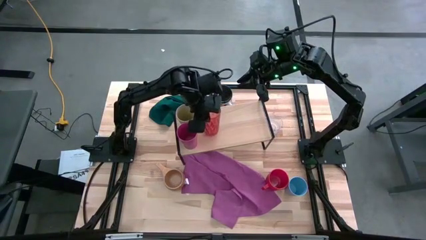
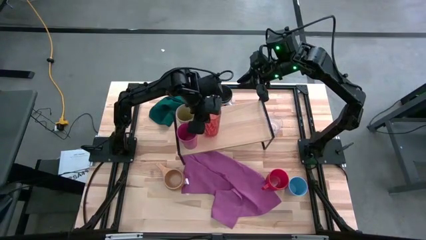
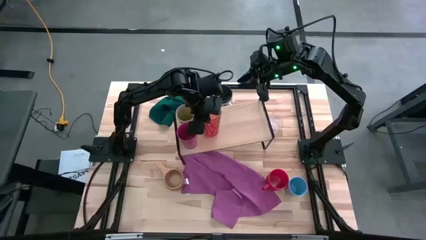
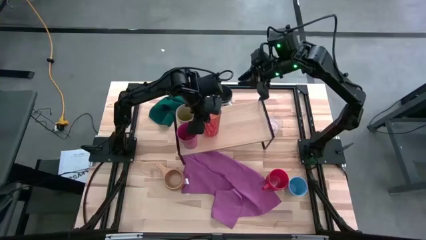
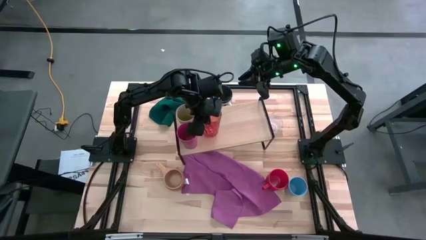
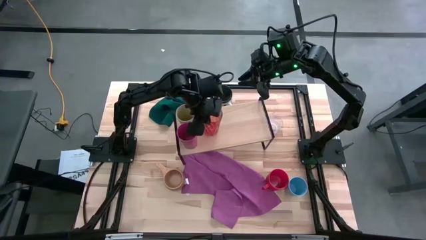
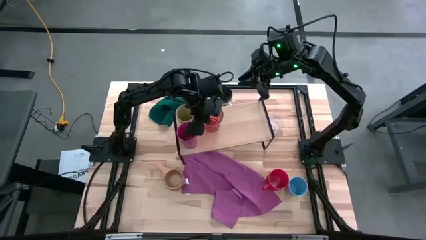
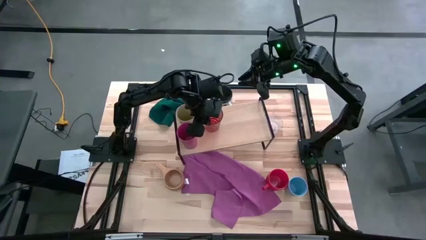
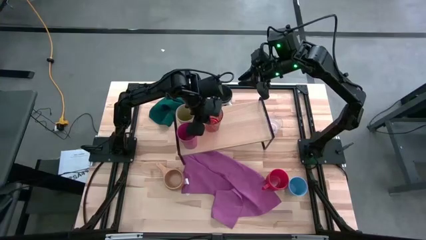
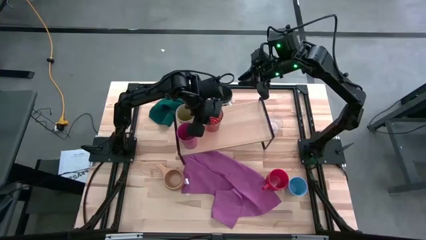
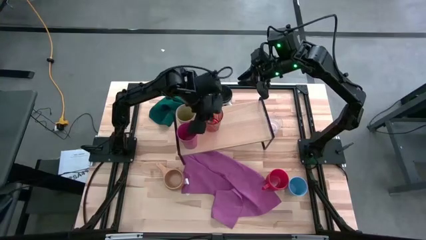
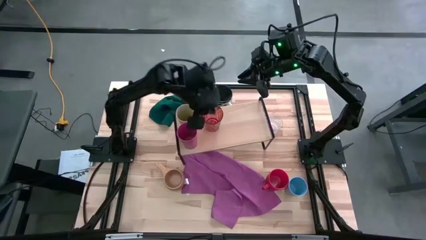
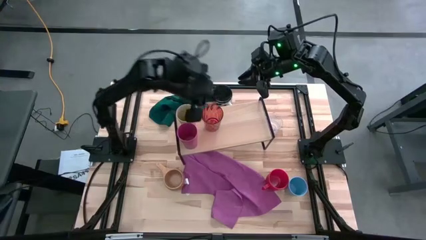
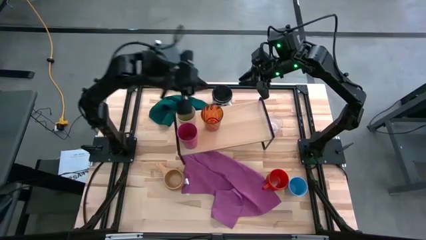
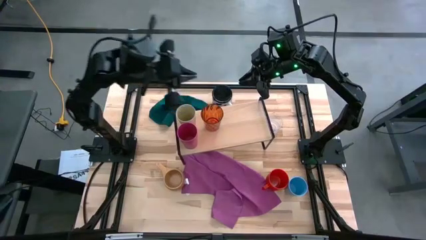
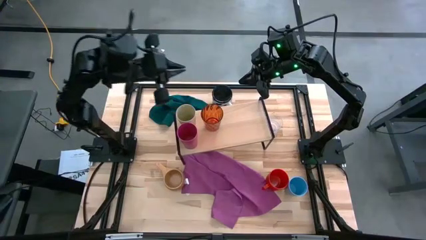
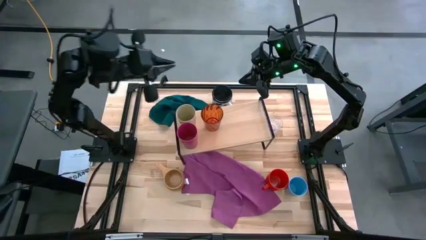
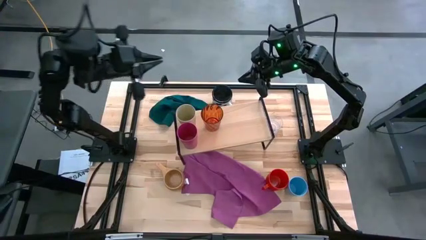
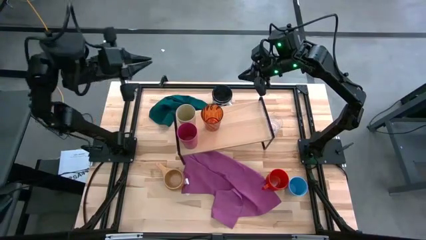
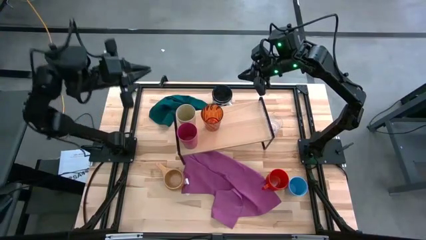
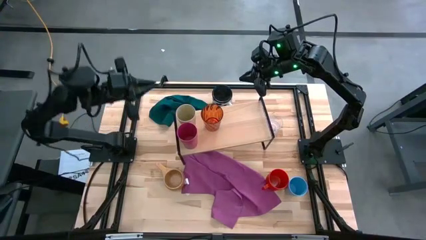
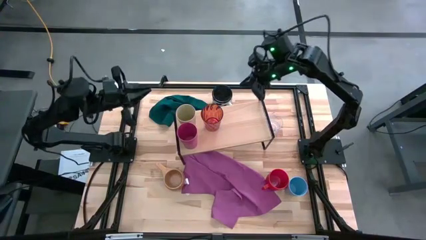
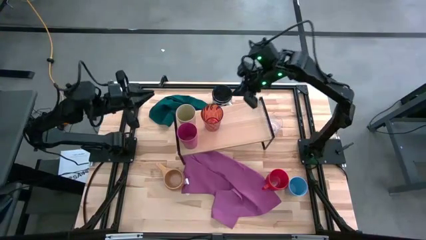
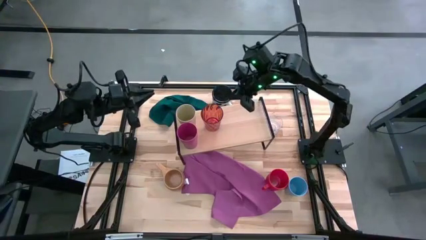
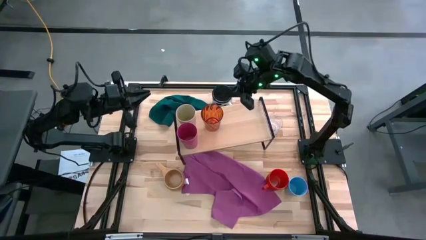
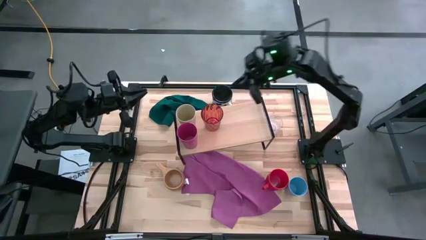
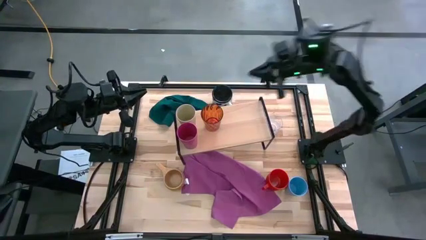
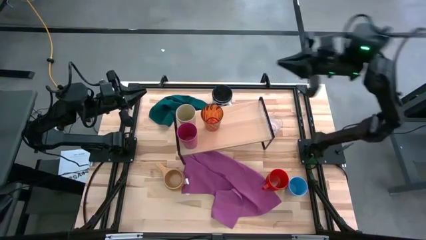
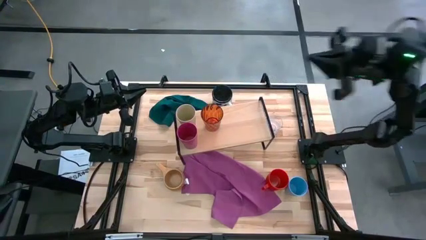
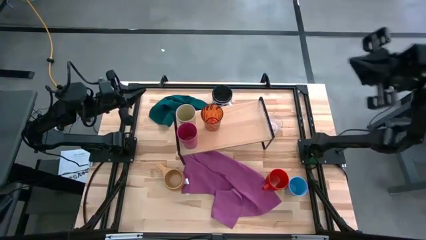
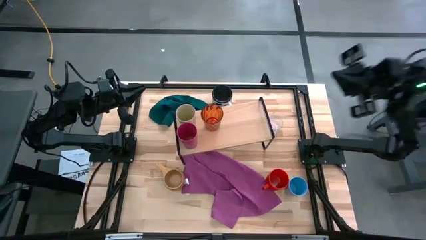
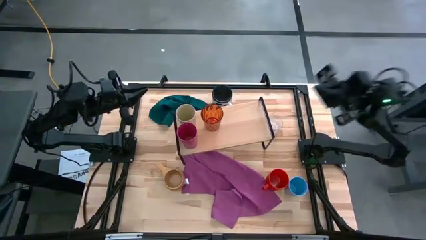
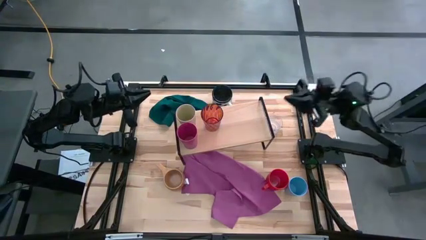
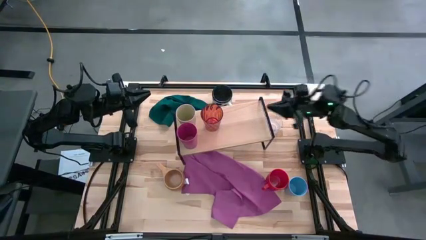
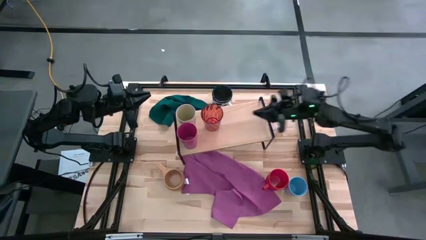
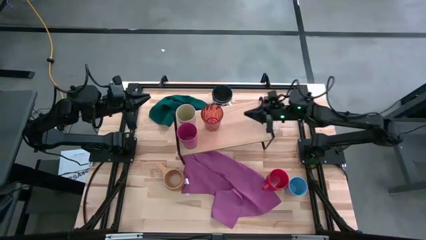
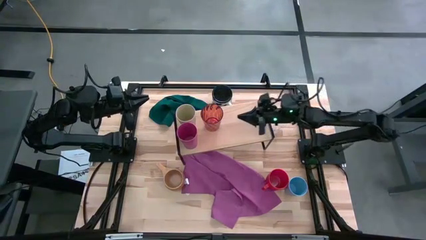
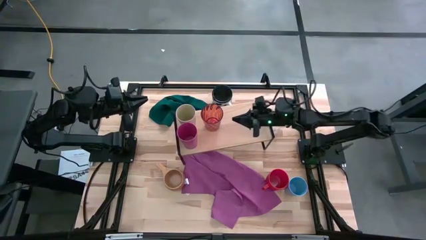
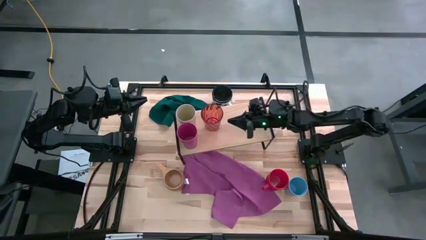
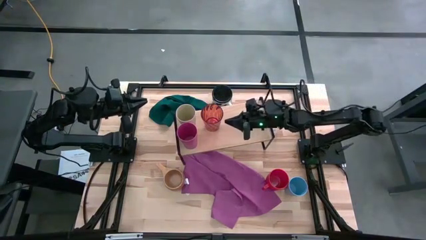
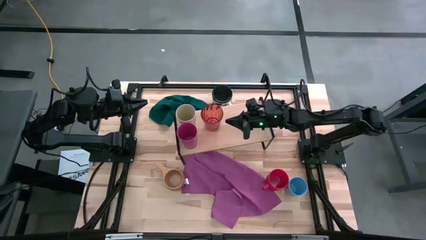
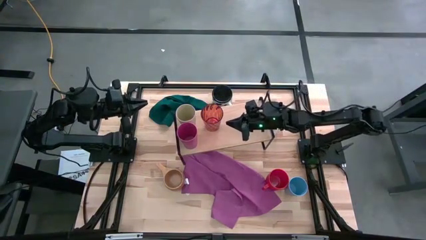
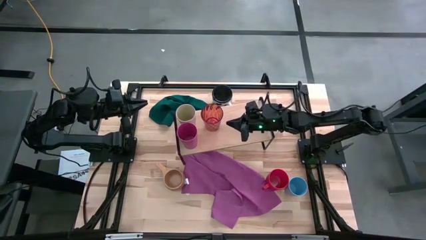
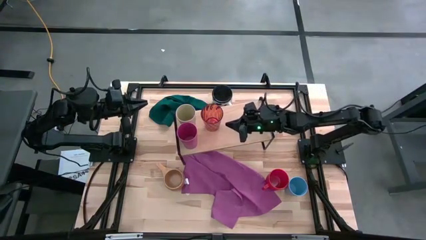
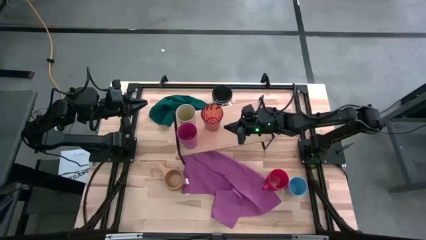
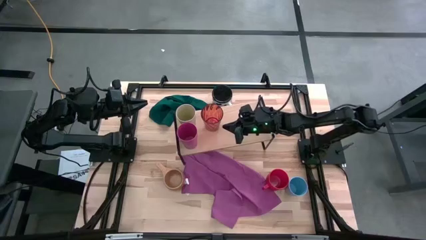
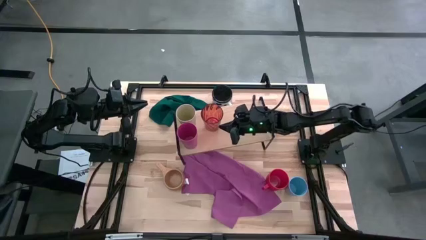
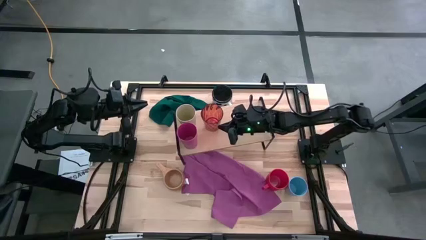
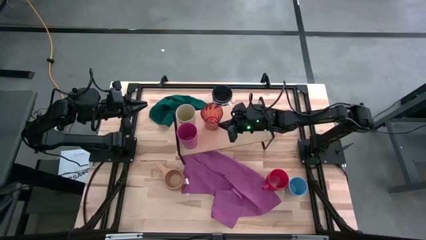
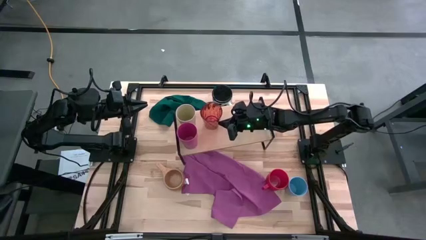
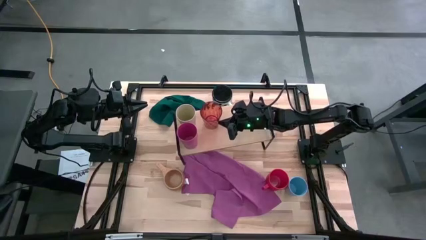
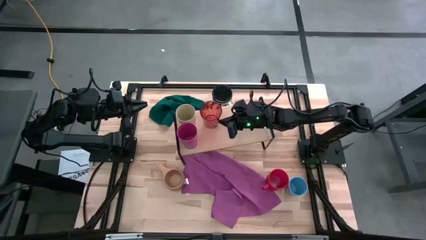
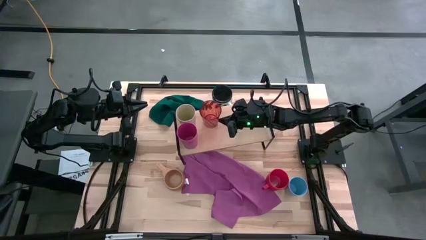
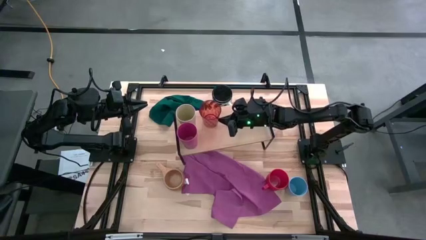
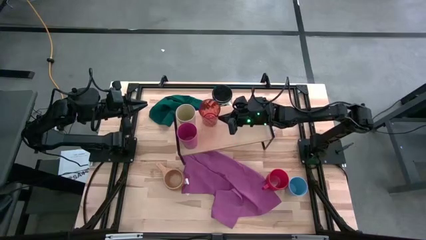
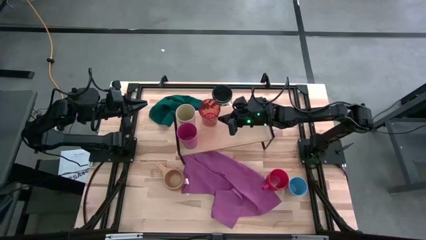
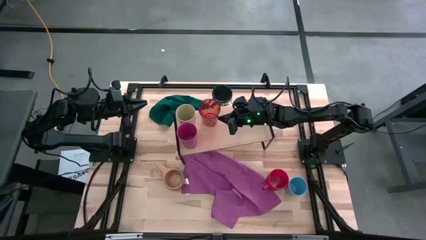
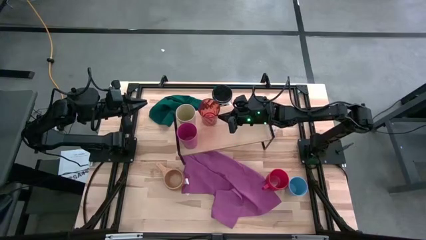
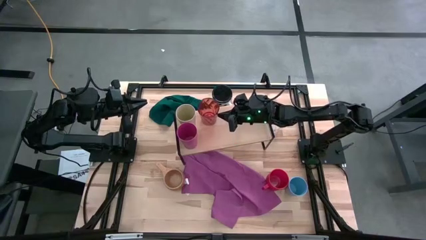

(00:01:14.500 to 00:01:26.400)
Task: Stack small to large cups/mugs on shelf
Put the red cup on the shelf

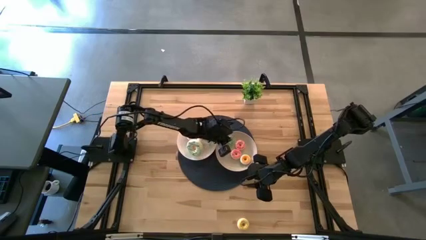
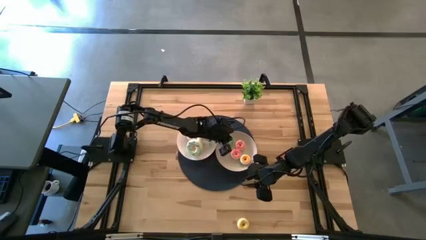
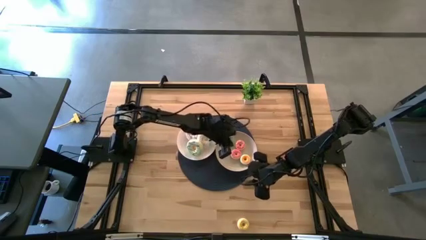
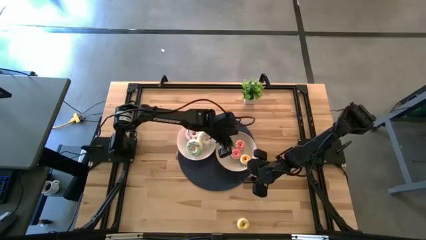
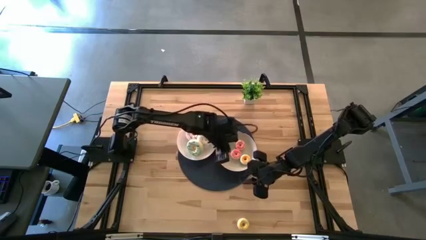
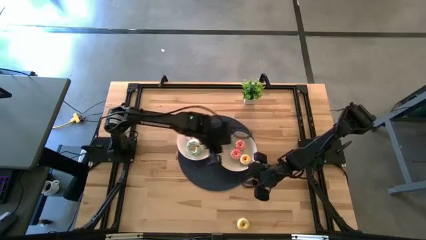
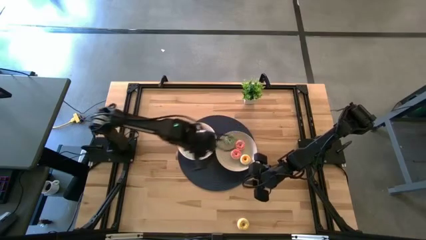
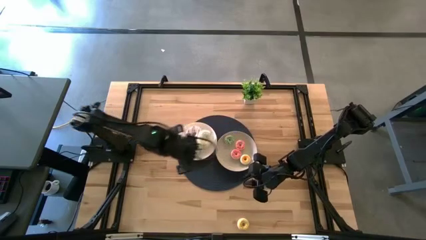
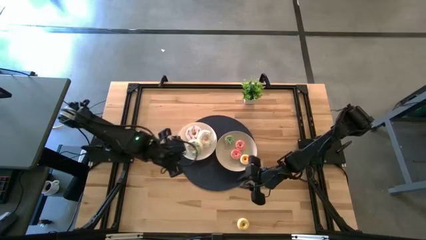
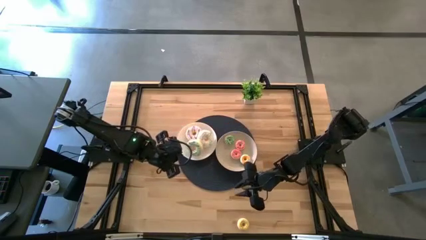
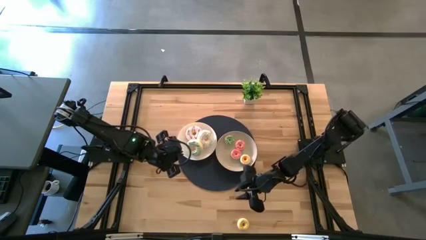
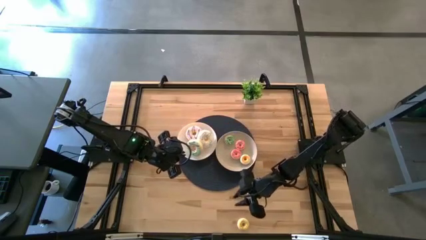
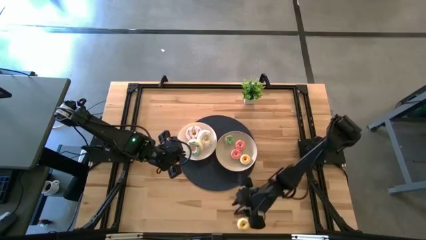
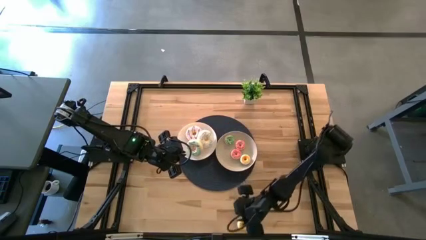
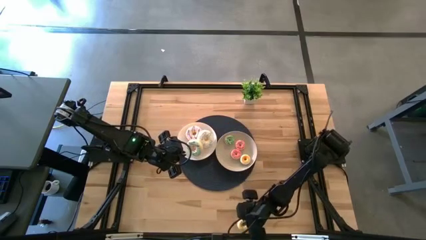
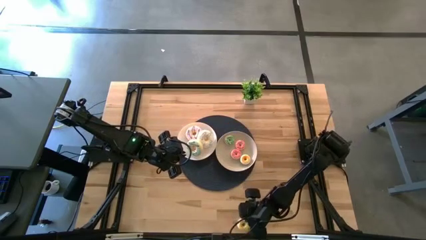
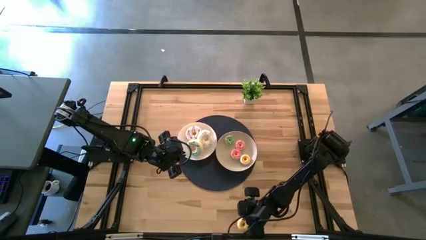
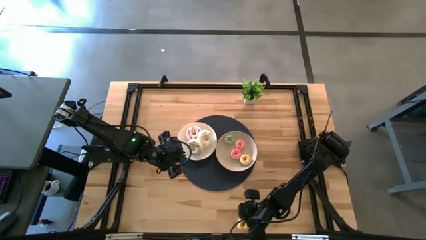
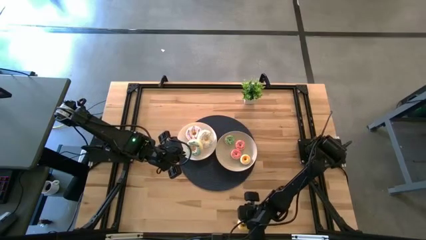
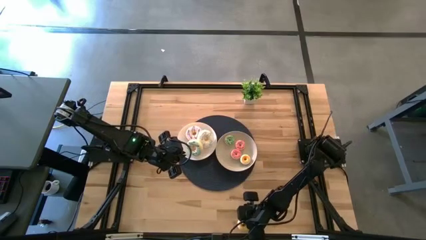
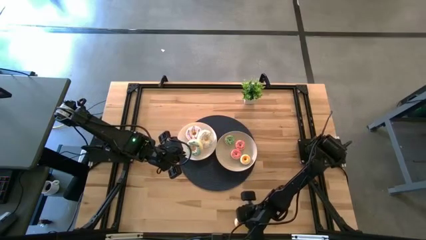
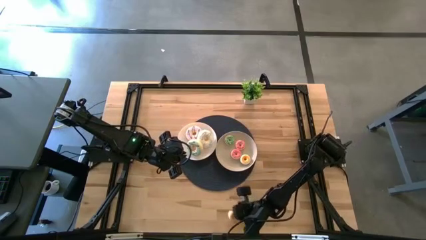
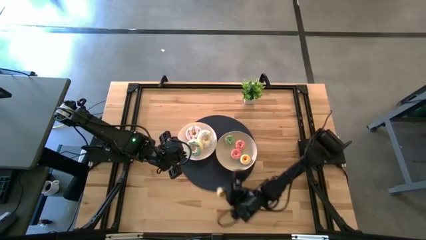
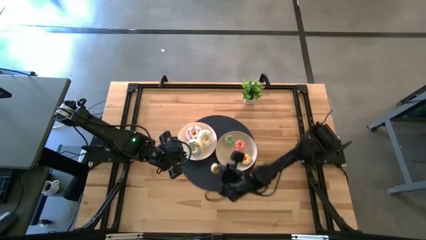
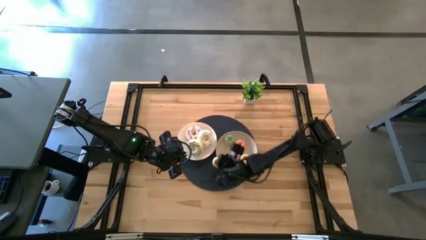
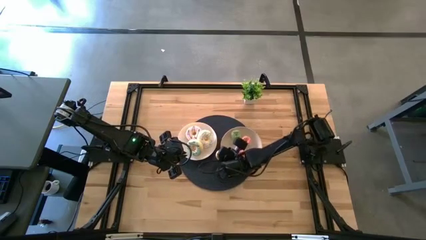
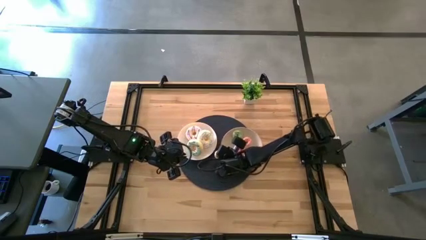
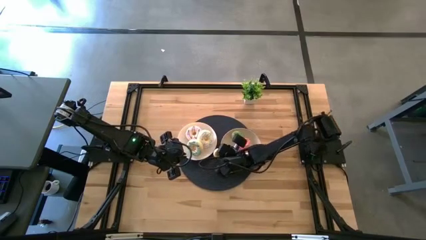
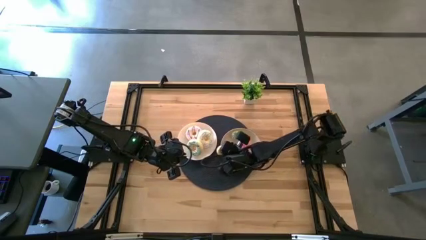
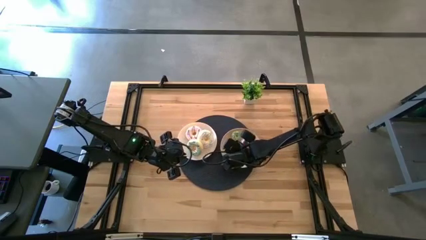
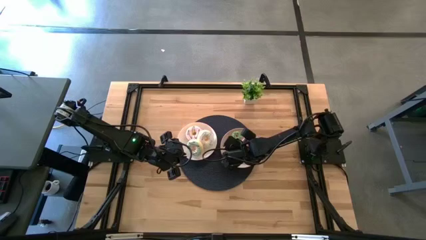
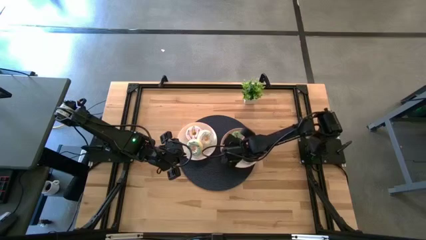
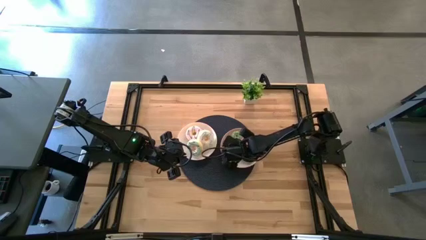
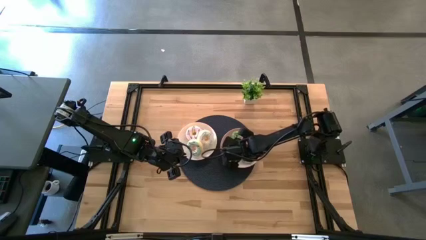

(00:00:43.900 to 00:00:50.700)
Task: Pick & Place donuts
Put the yellow small donut on the light brown plate
